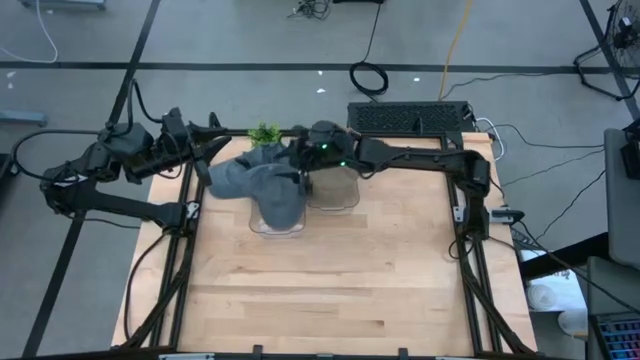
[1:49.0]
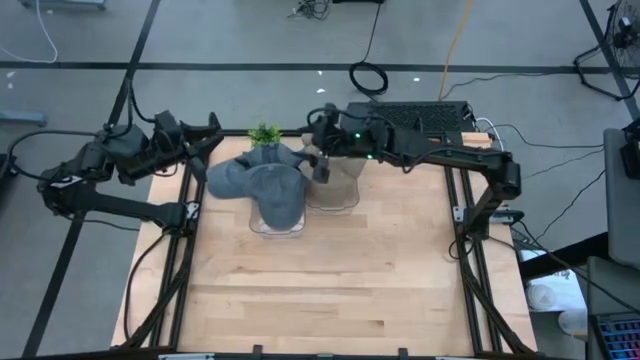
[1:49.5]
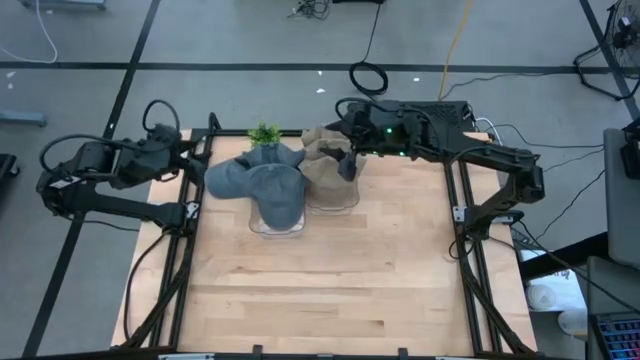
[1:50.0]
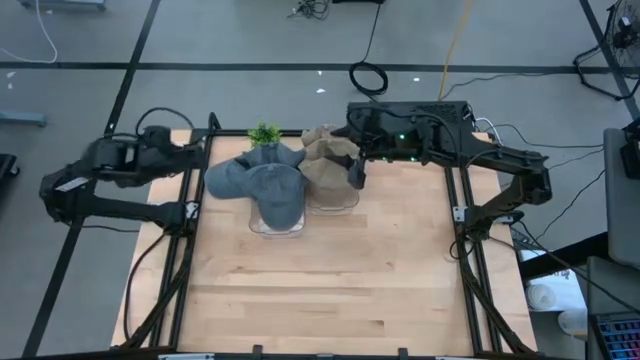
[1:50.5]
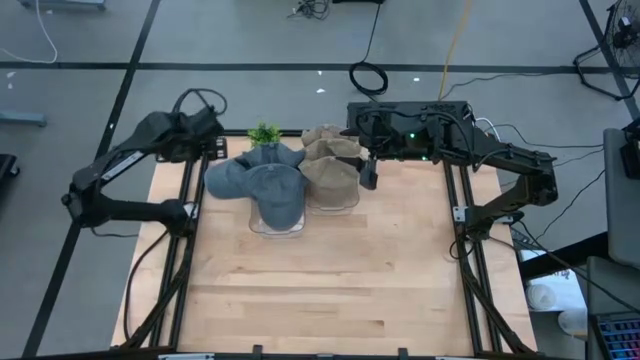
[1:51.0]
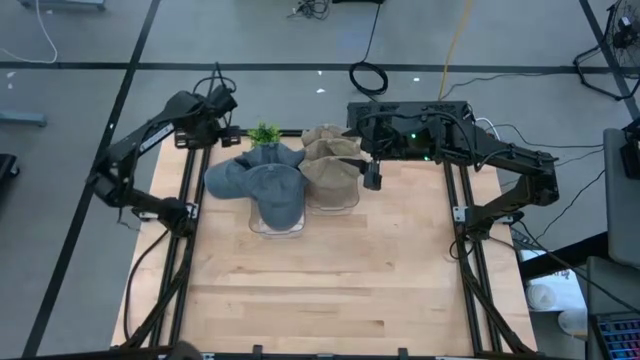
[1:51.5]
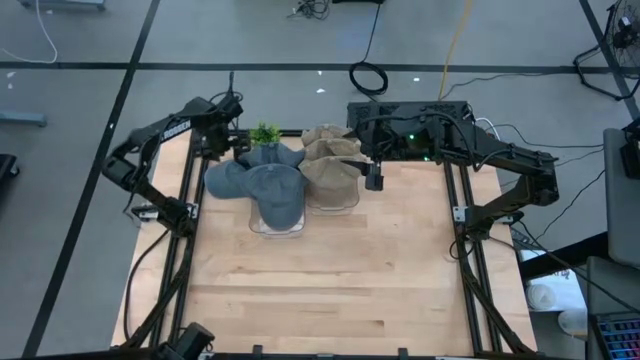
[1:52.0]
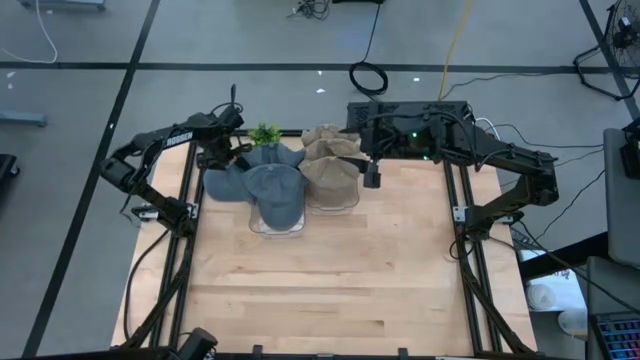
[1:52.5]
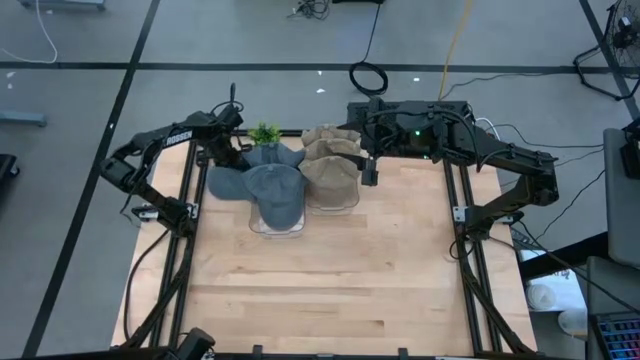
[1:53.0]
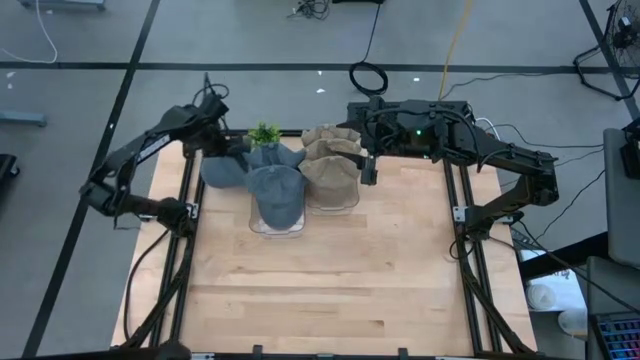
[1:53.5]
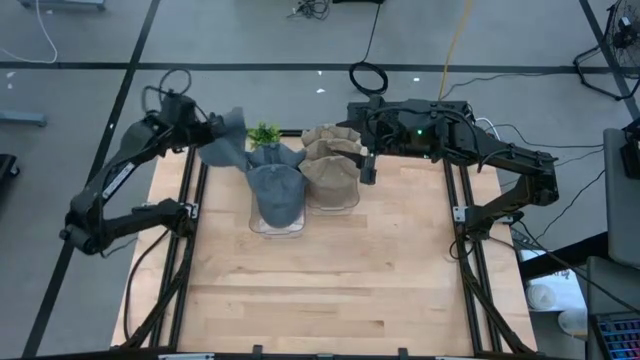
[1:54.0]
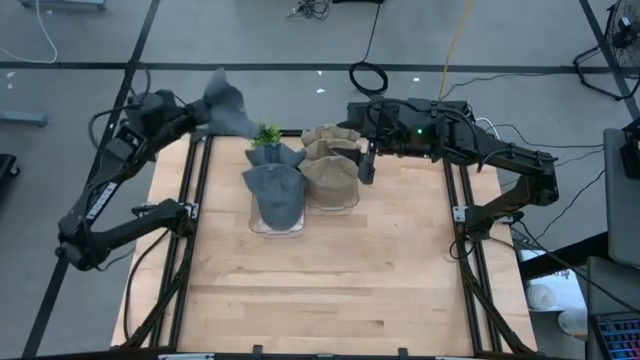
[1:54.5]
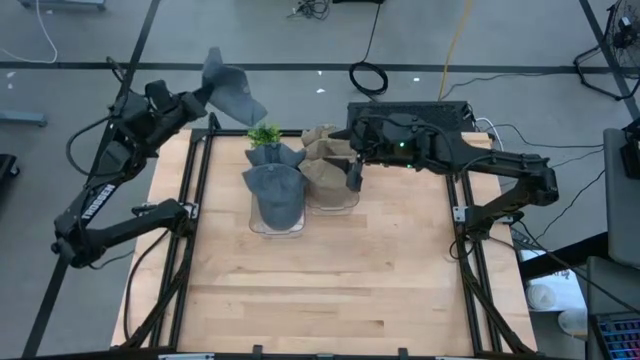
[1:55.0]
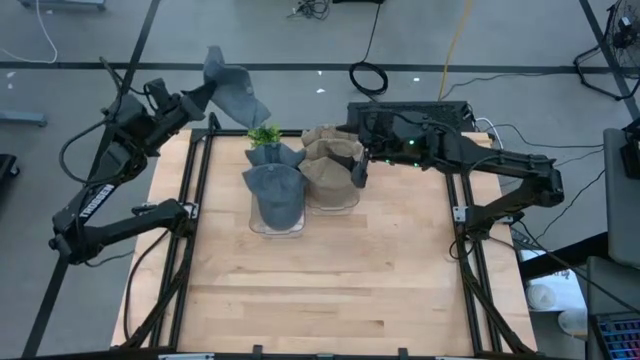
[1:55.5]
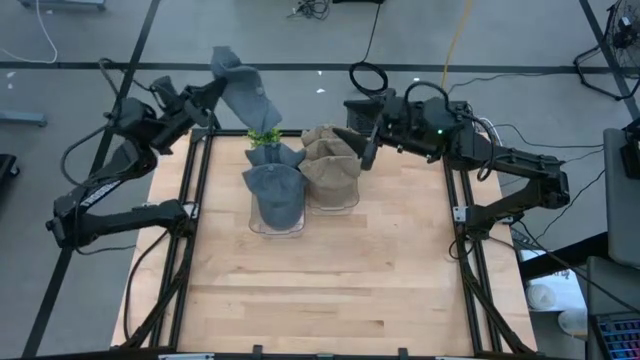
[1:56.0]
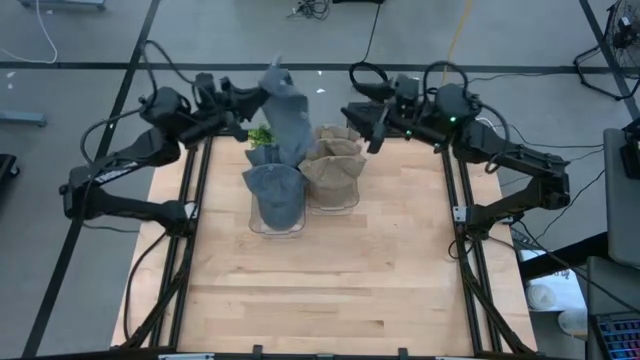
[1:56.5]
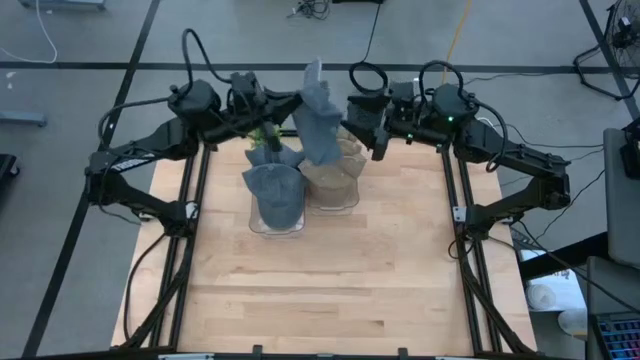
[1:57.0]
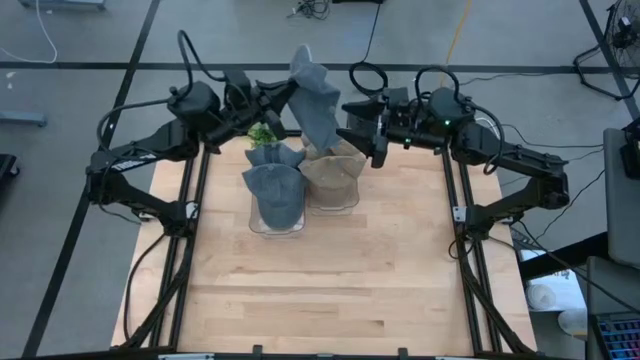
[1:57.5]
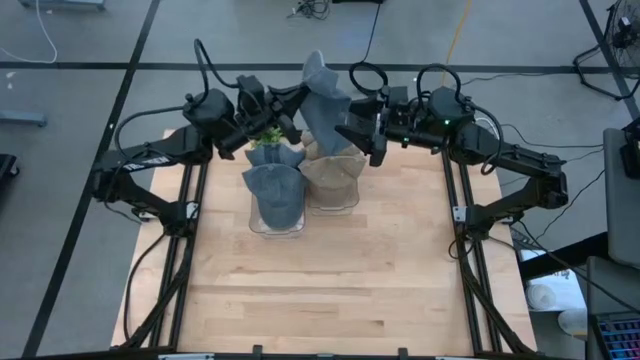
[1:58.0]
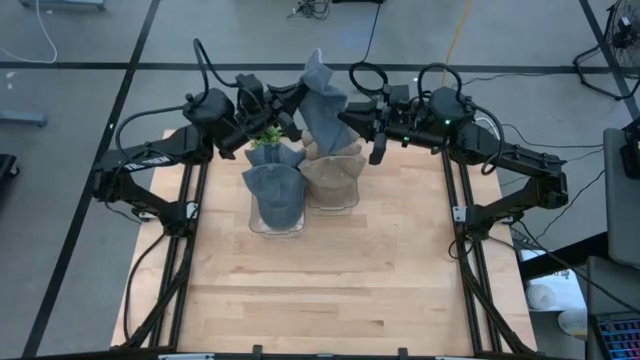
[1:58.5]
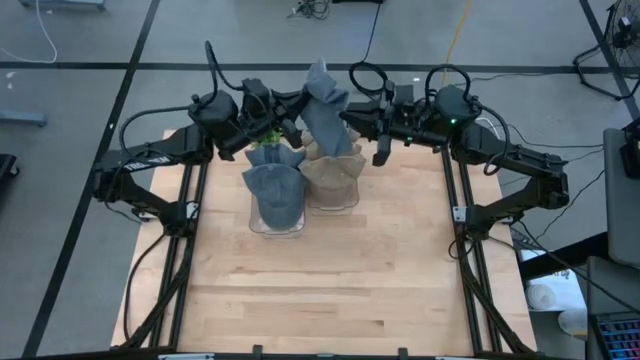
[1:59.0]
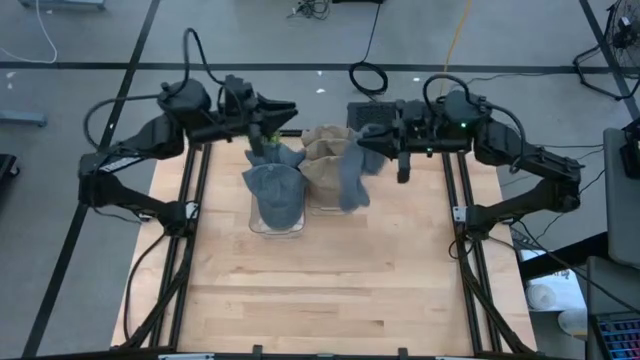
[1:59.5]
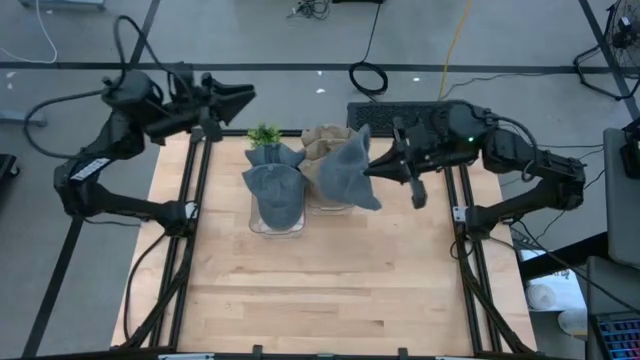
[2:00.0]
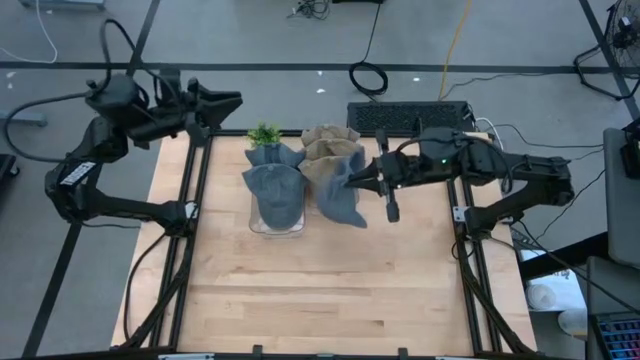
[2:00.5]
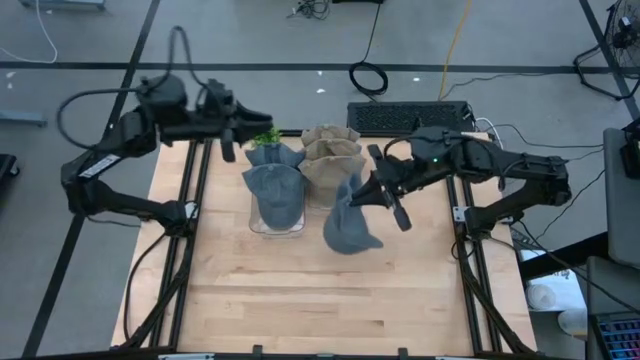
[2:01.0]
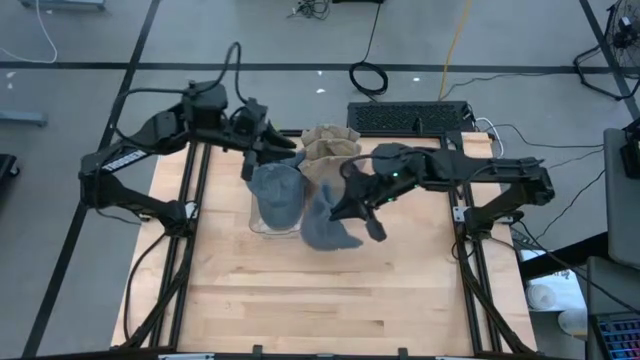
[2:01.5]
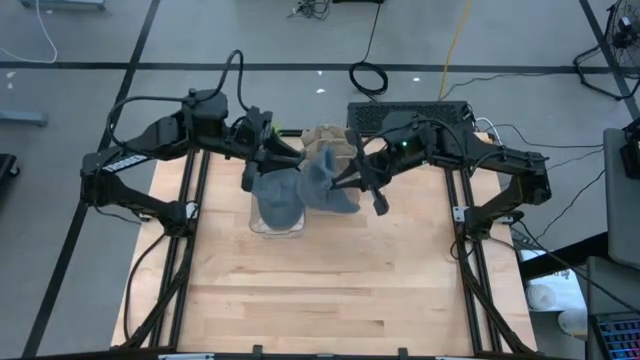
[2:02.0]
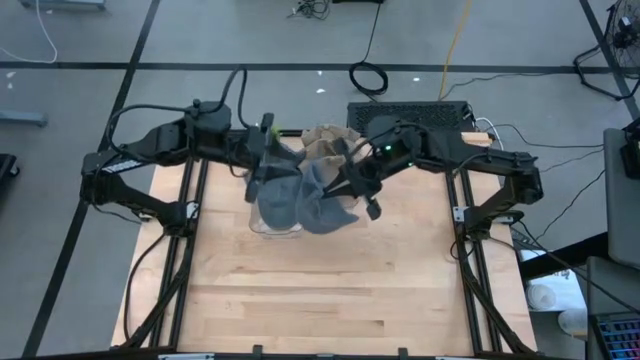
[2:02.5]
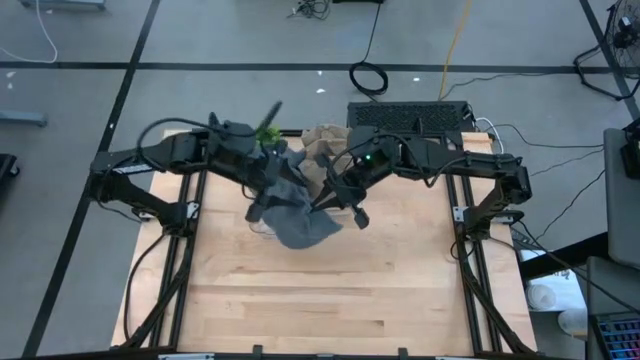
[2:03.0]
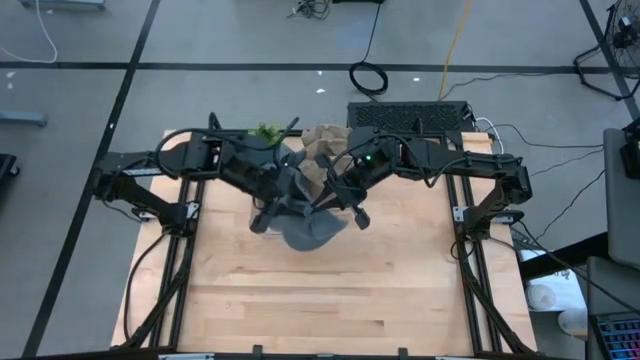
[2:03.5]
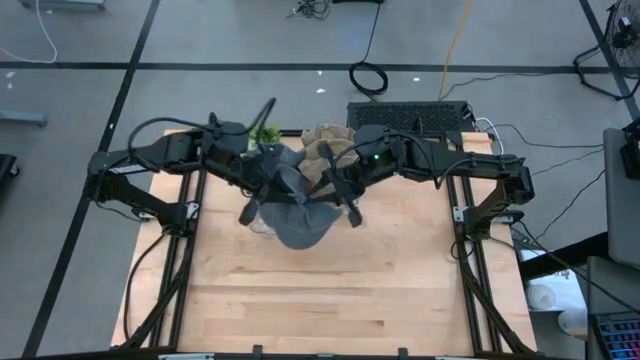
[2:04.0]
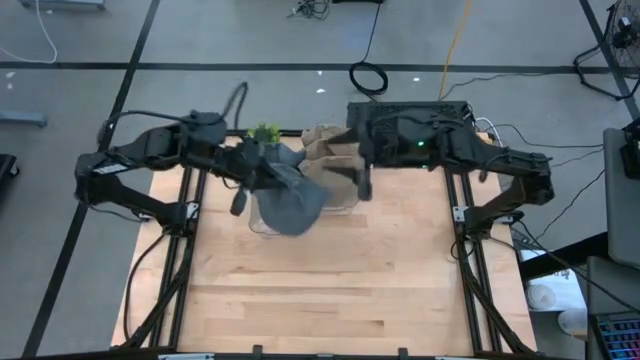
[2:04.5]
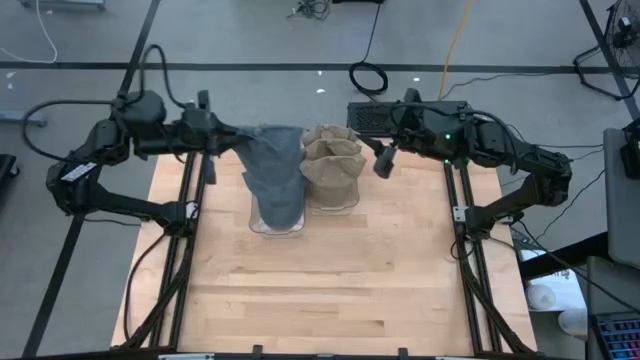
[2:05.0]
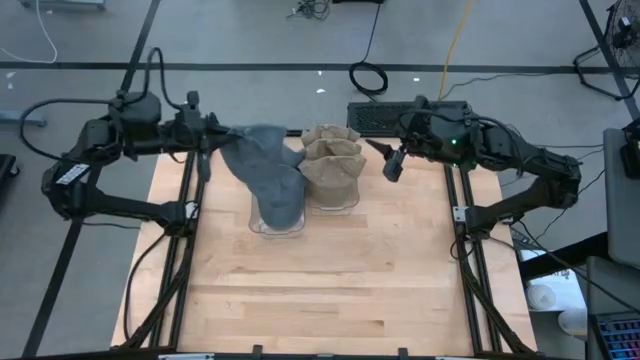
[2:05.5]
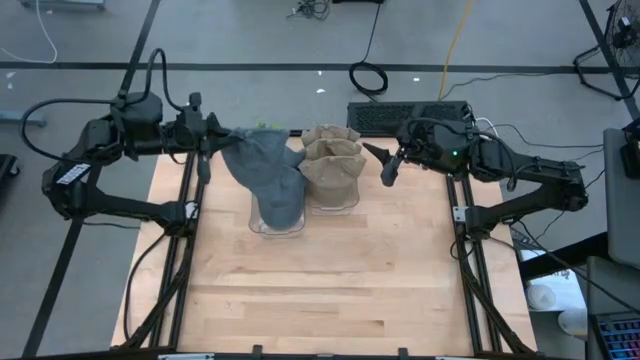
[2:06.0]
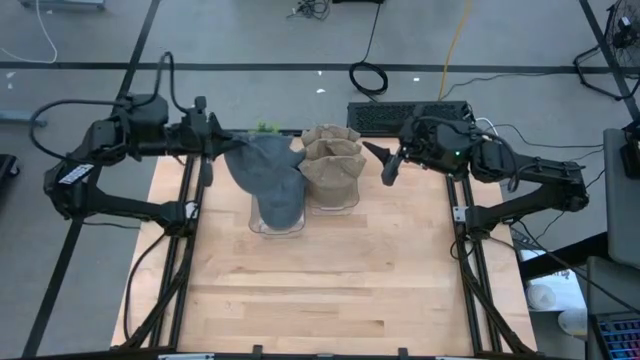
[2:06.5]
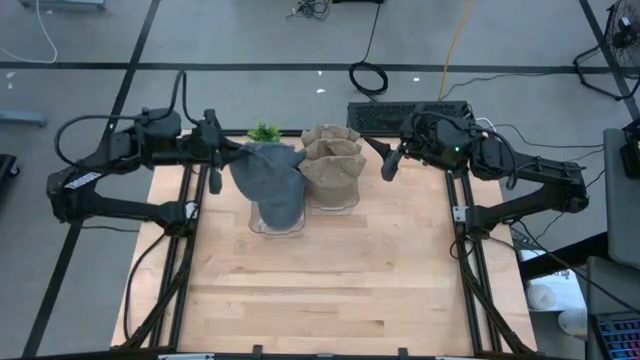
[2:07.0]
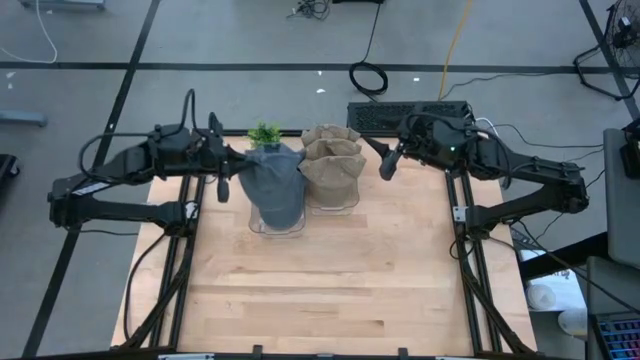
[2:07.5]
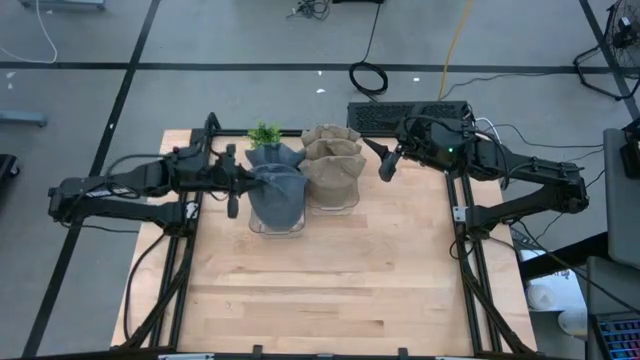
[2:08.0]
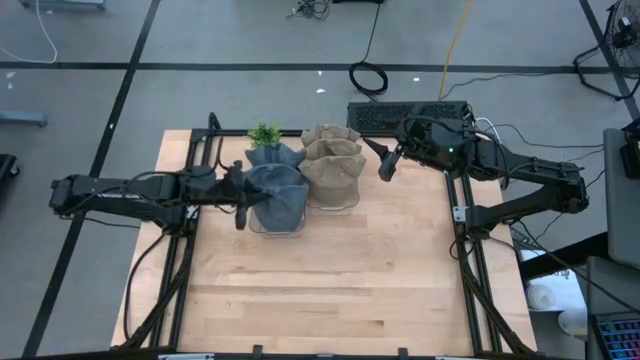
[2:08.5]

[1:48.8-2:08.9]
Task: Pick & Place hat
Put the blue cap into the left transparent bin

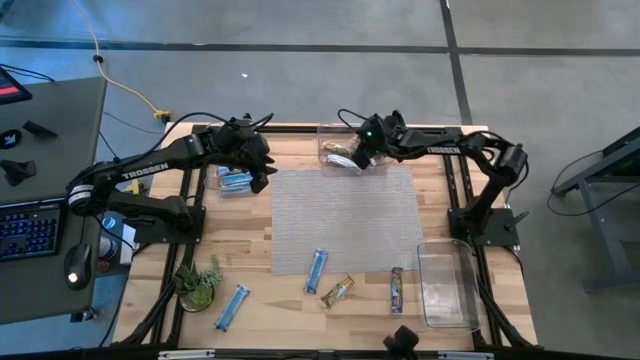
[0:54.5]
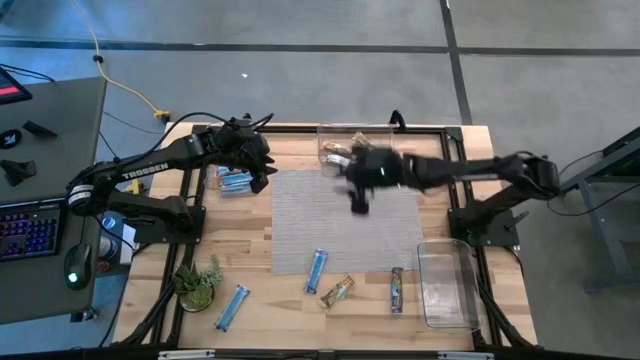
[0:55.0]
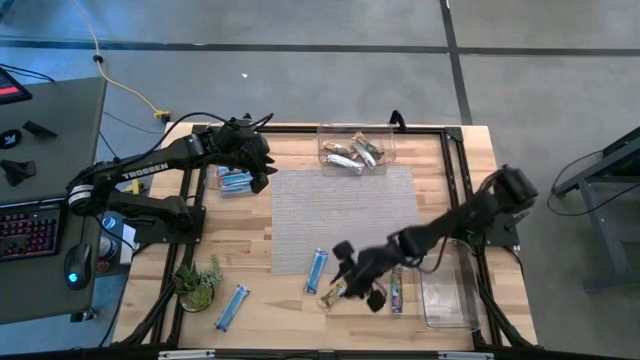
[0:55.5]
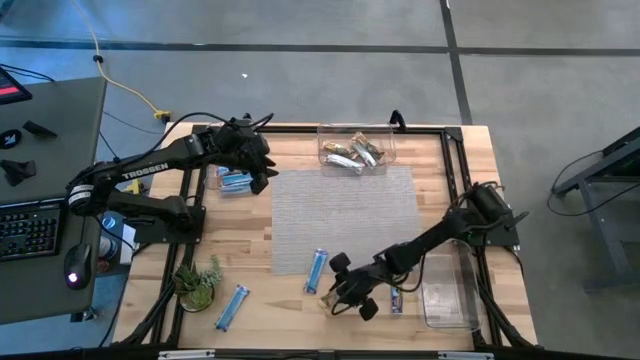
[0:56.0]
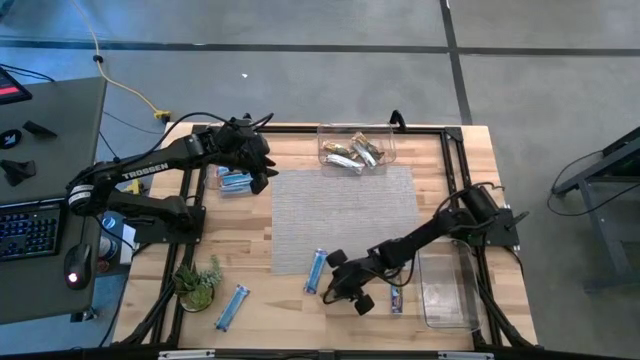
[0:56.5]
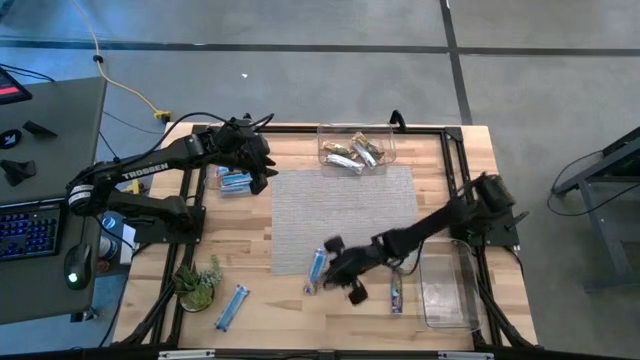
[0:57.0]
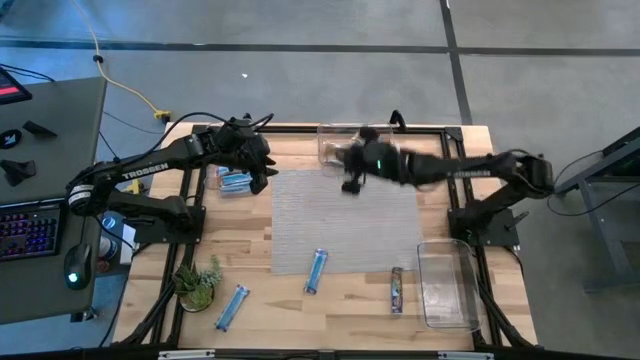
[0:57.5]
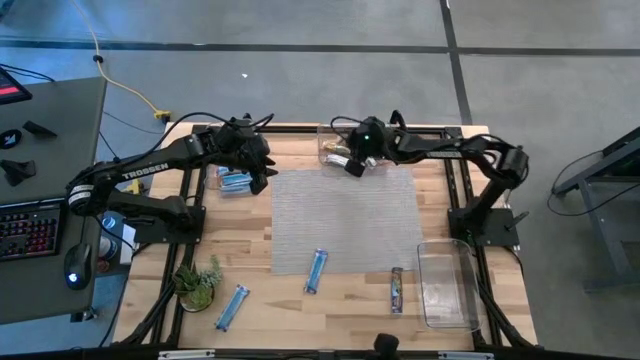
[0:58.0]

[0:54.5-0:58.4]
Task: Pick and place Granola Bars by type
Put the yellow granola bar into the top right transparent bin
